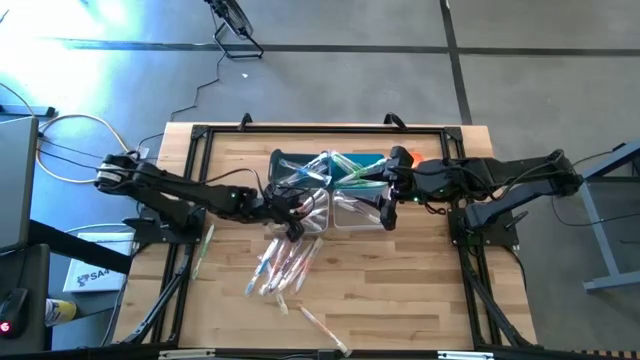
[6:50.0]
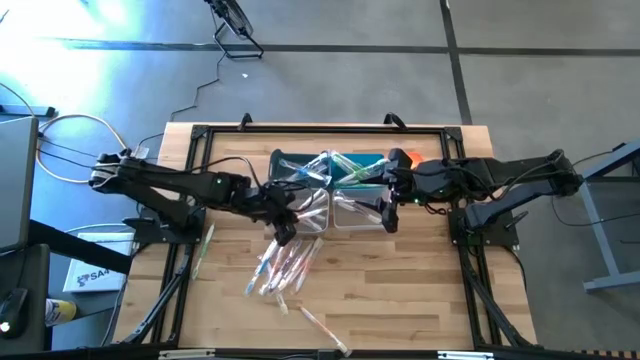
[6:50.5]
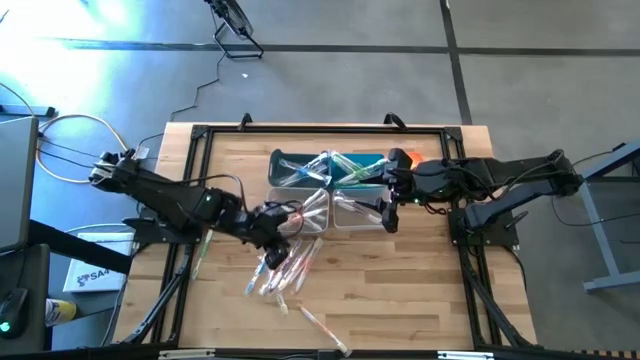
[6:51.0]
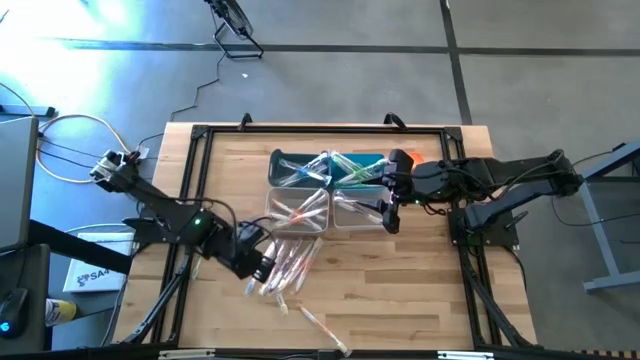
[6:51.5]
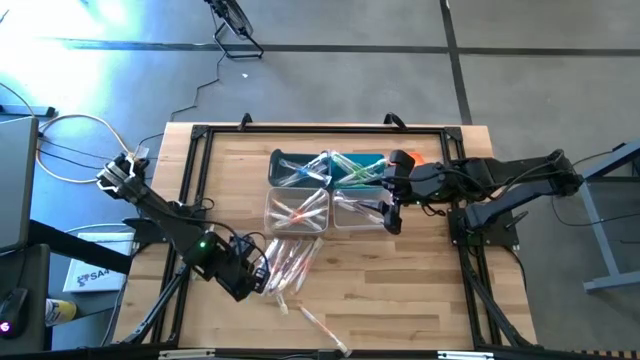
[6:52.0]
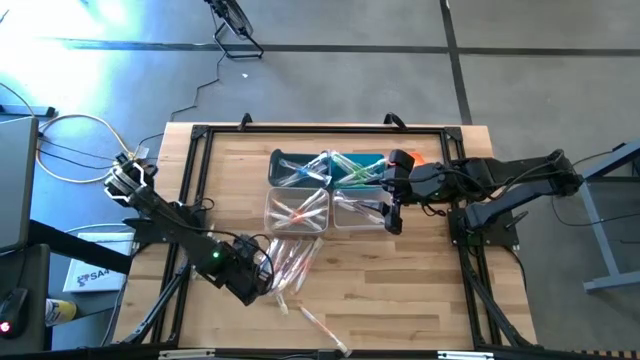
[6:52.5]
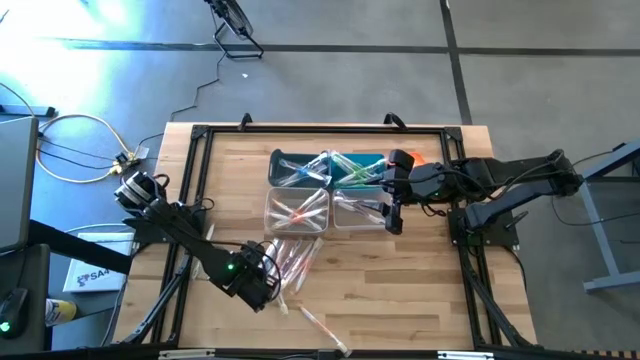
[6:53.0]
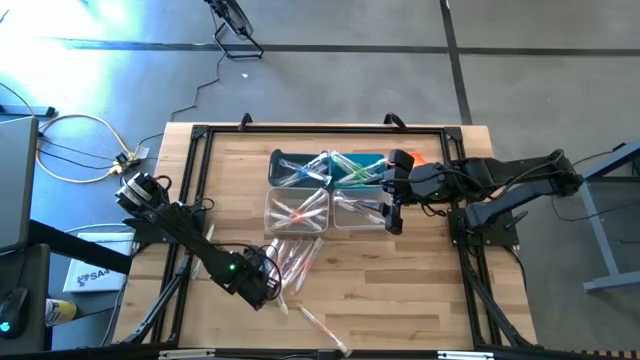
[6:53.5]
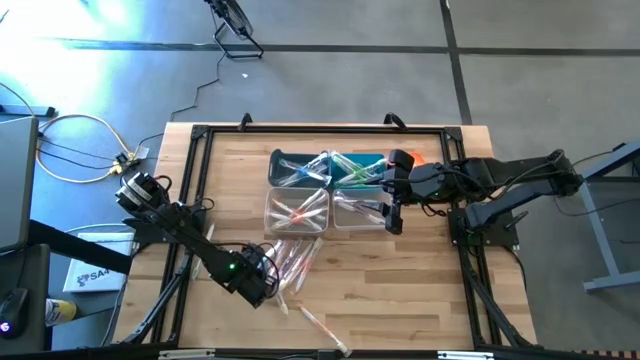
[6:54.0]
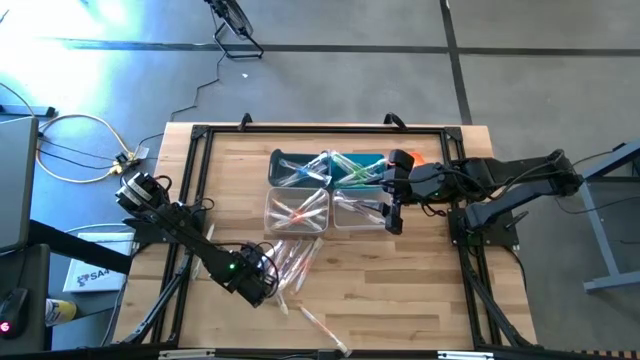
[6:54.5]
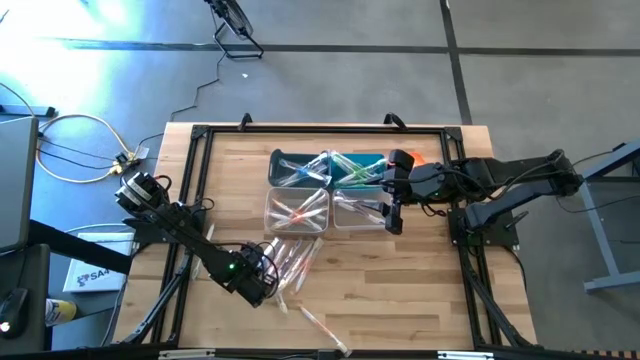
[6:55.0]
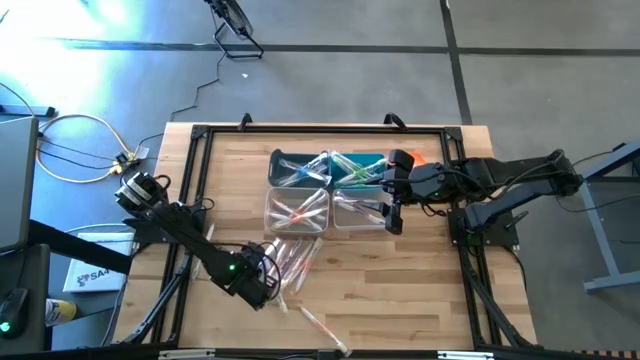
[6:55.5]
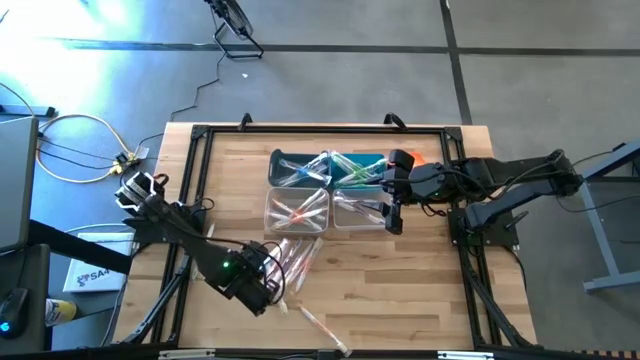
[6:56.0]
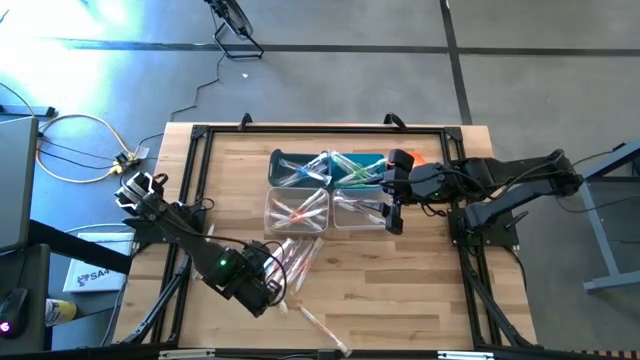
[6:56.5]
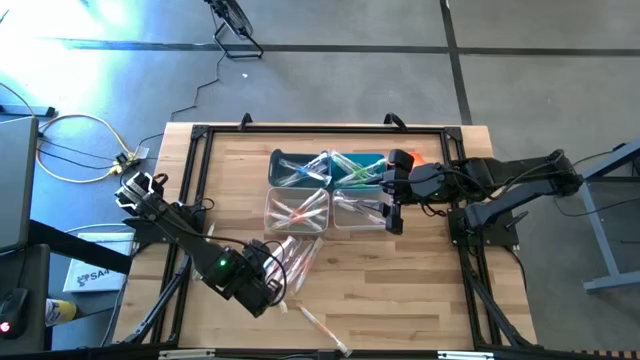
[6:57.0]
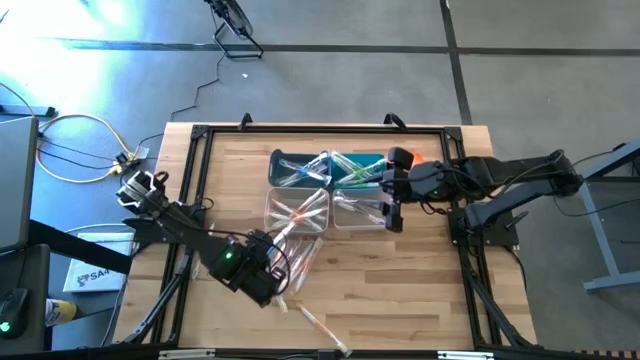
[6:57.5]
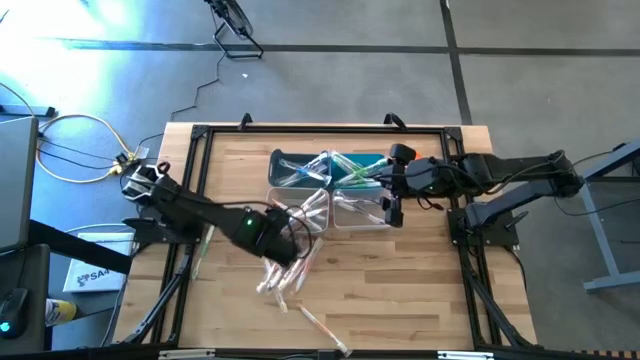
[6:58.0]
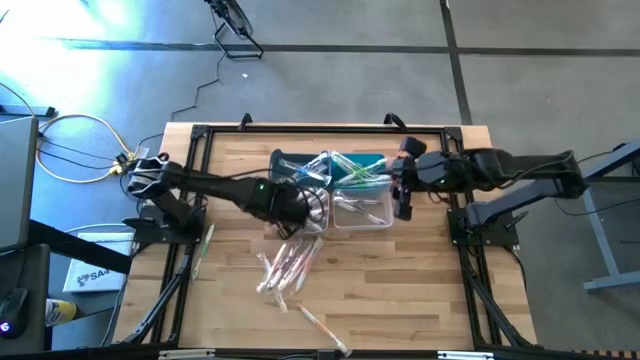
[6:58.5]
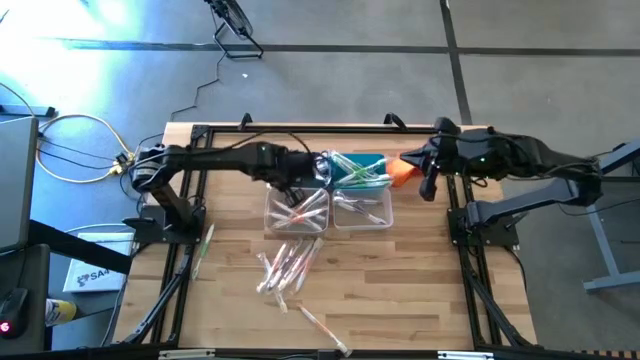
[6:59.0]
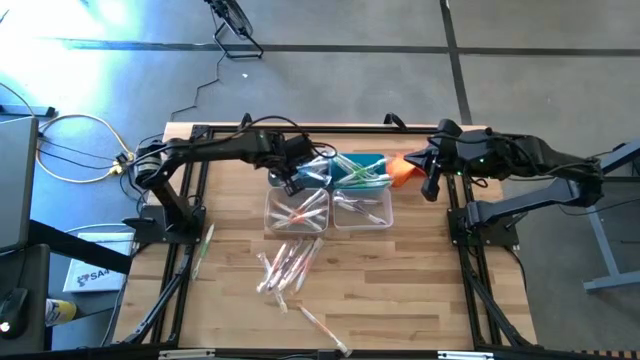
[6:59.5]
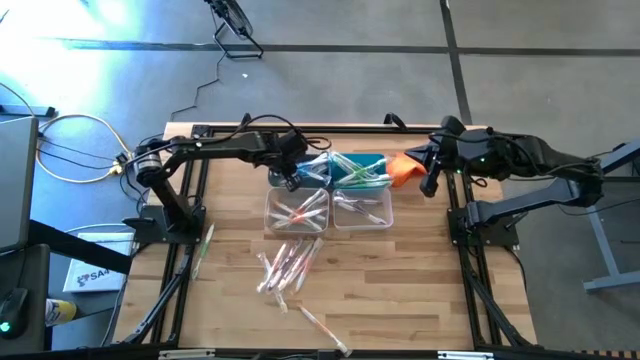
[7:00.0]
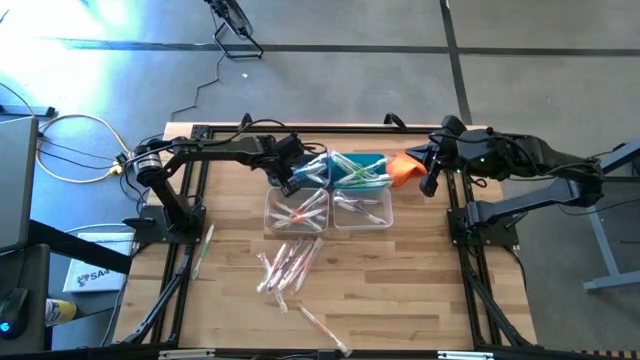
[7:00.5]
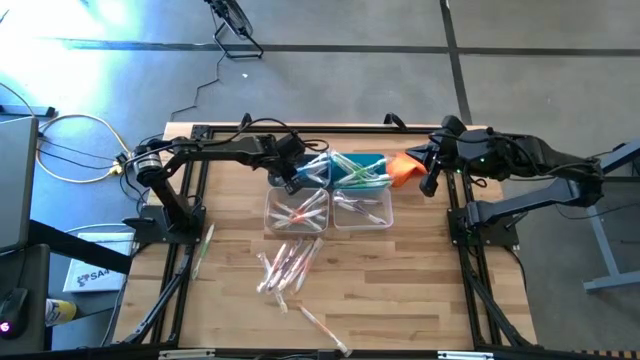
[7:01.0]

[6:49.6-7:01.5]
Task: Pick & Place Toothbrushes
Put the blue toothbrush into the dark blue bin

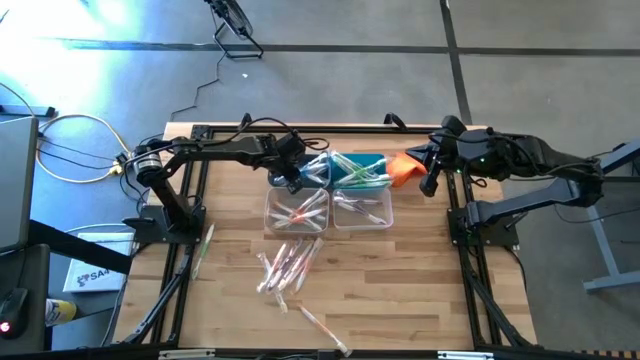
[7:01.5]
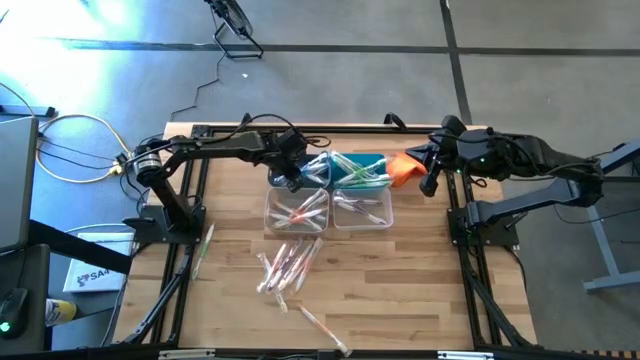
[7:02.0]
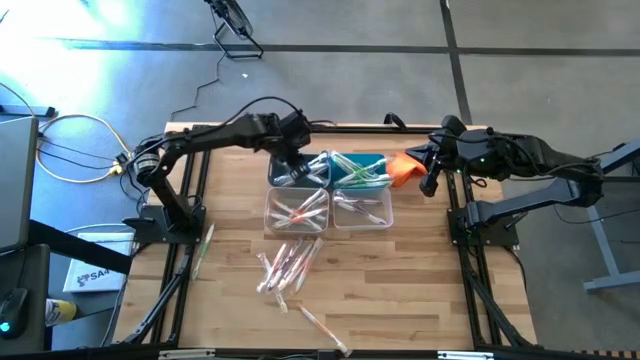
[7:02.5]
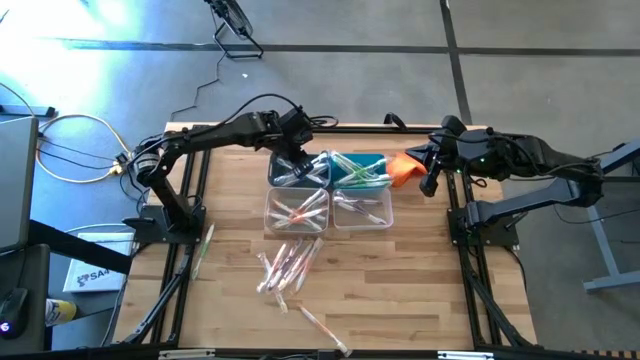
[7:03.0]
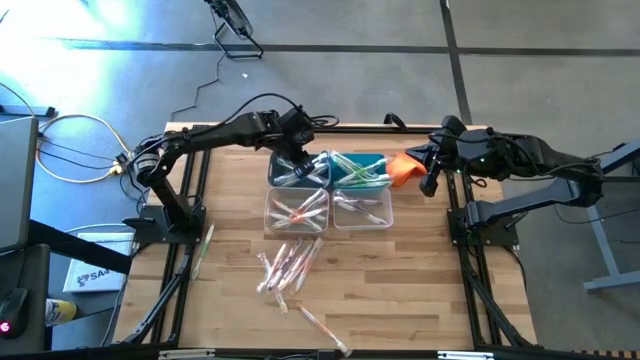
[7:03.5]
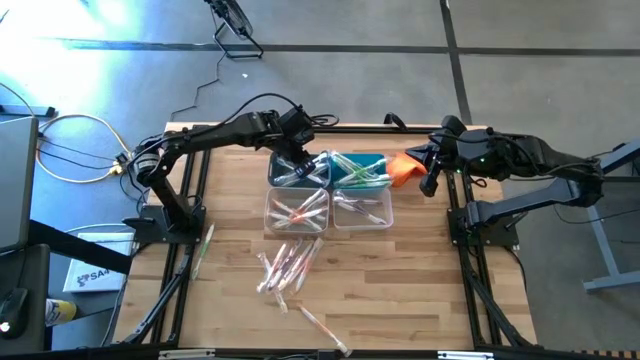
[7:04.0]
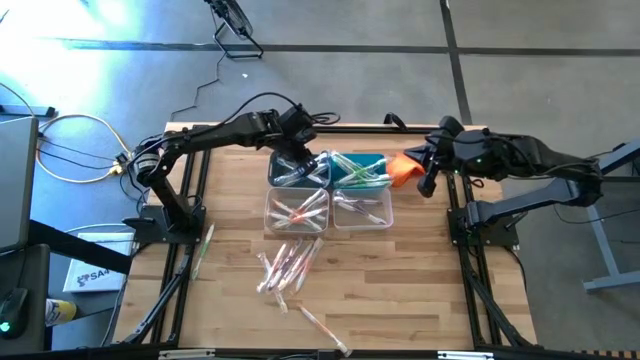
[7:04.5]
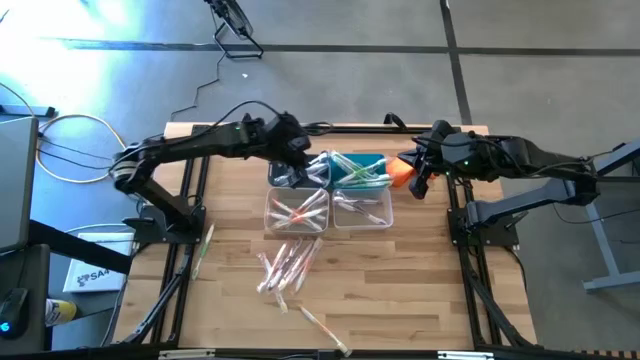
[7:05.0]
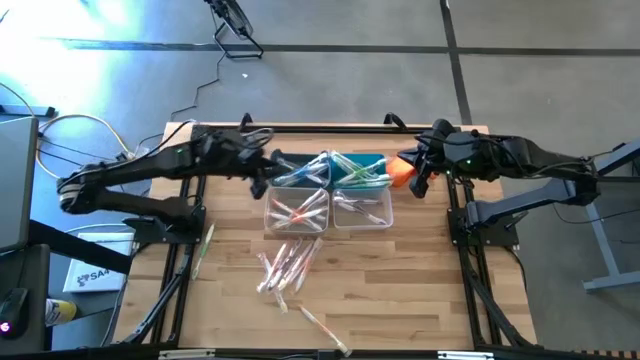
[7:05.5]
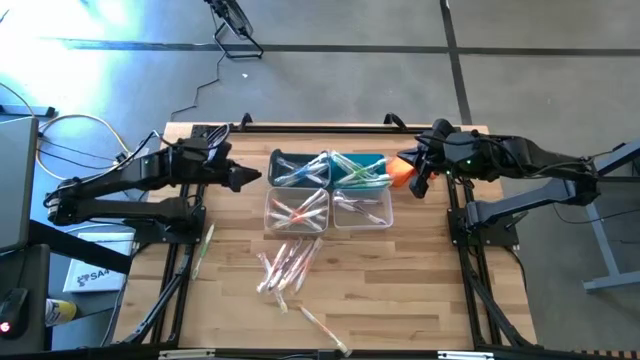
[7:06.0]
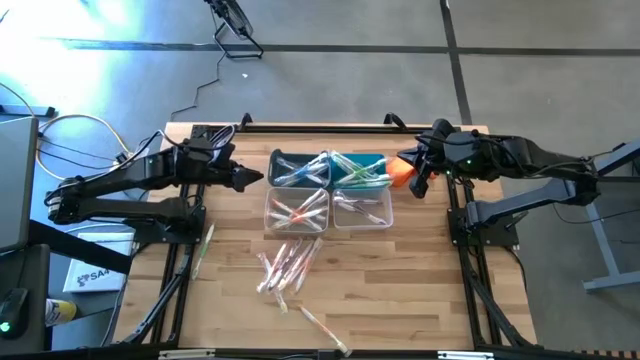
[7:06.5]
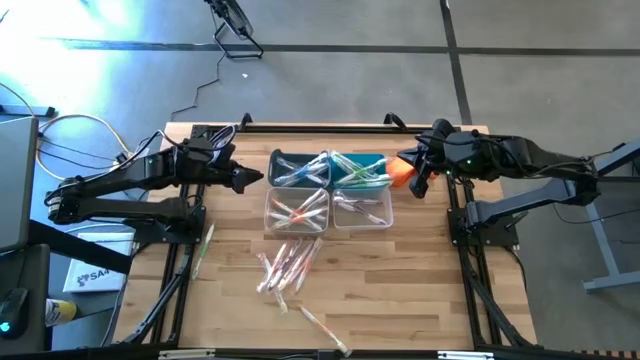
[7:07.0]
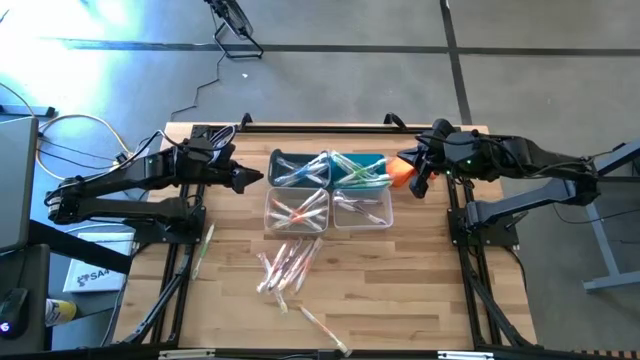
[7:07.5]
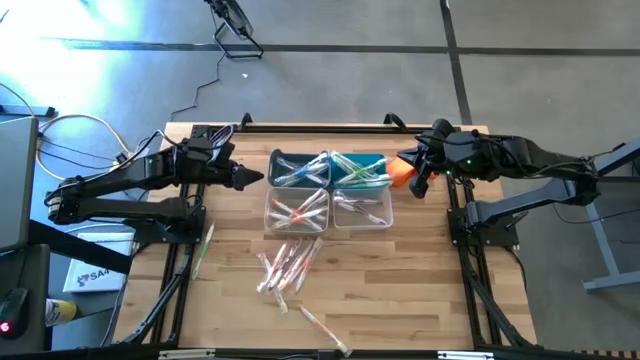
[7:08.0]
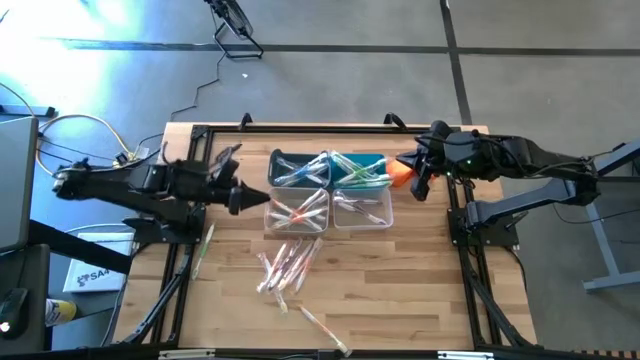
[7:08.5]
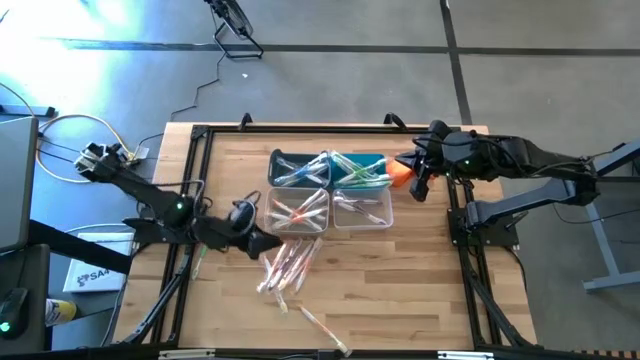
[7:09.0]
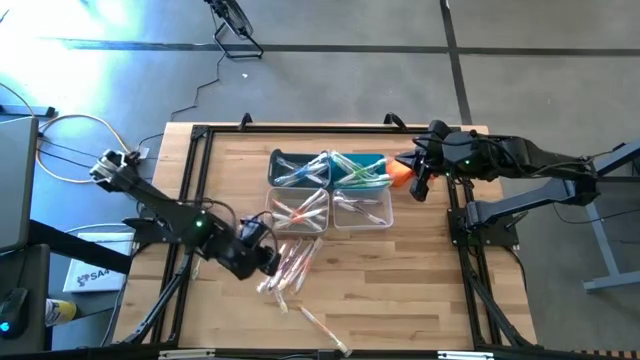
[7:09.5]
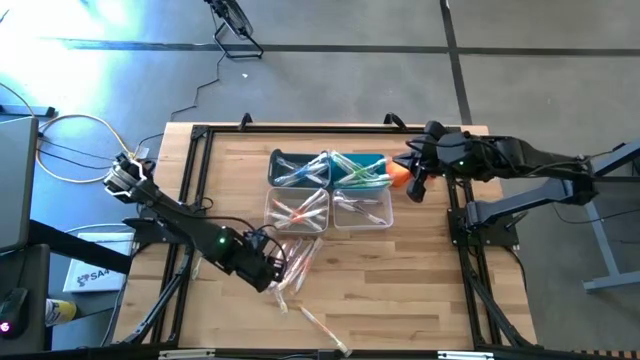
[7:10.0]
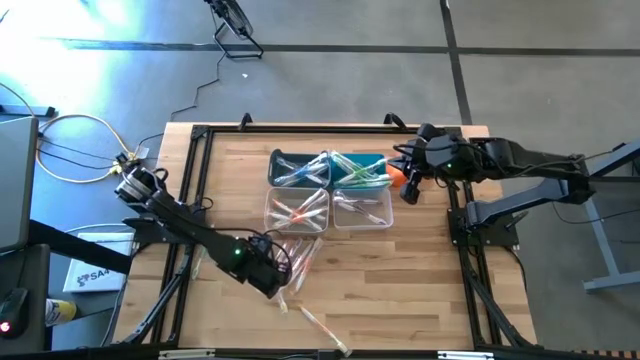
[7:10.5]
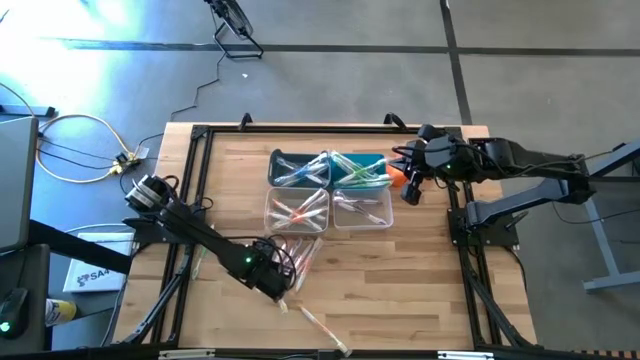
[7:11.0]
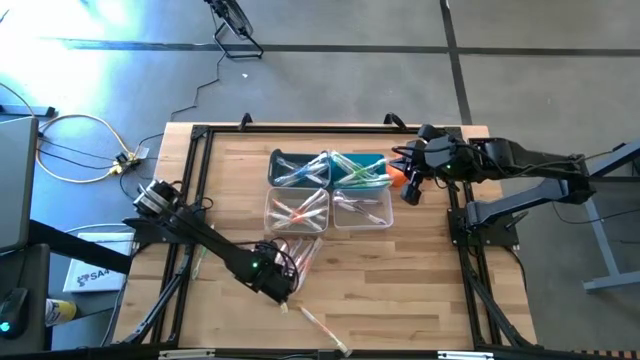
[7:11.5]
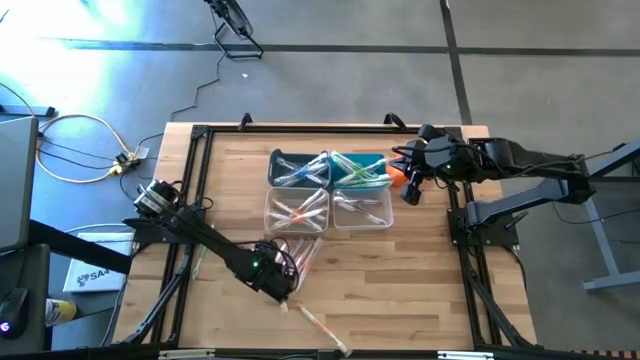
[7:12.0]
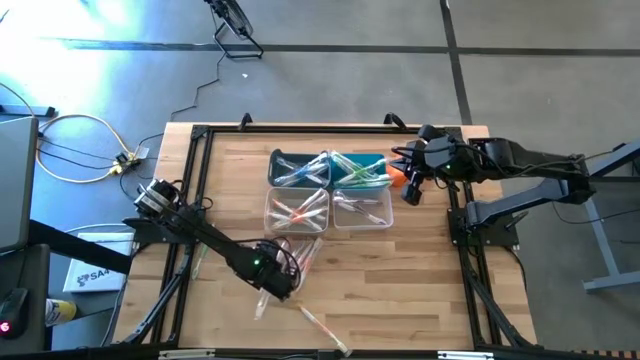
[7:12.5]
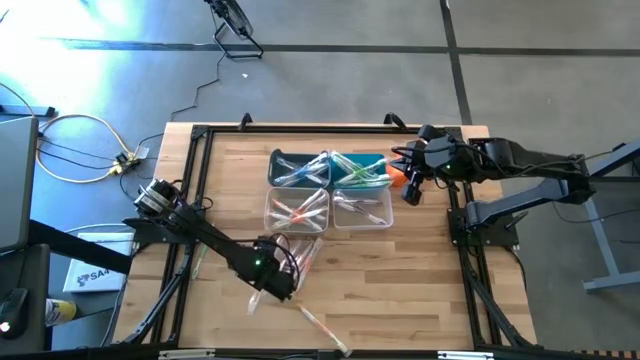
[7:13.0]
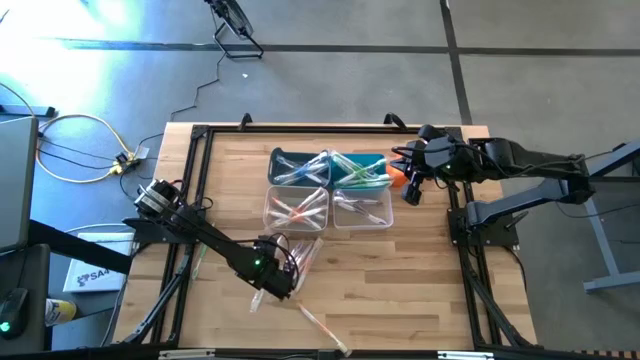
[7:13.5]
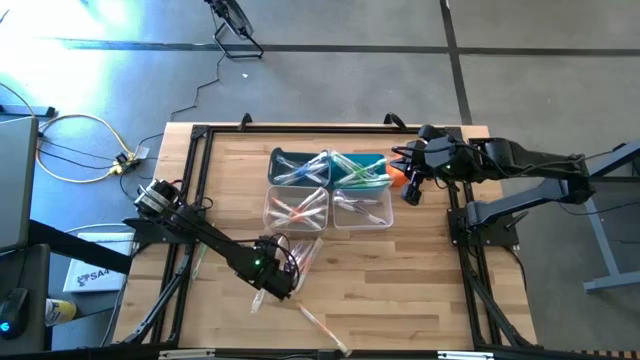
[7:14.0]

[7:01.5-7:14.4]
Put the orange toothbrush into the gray bin
